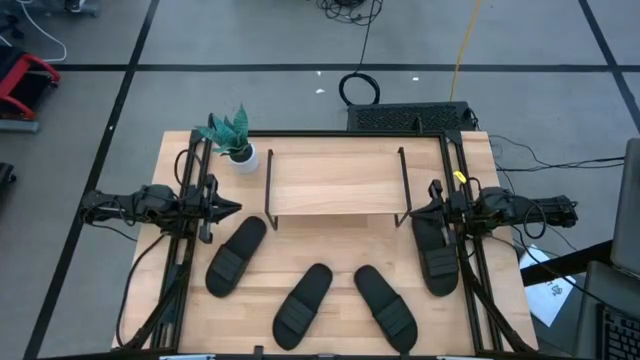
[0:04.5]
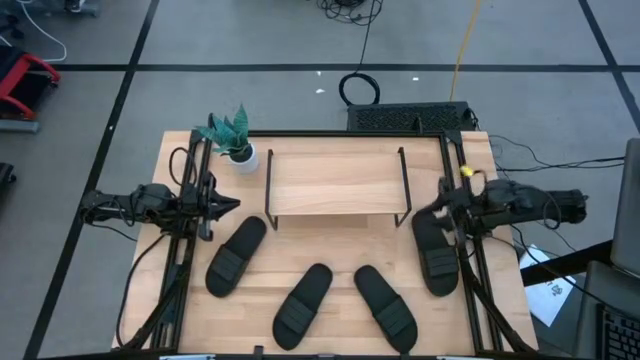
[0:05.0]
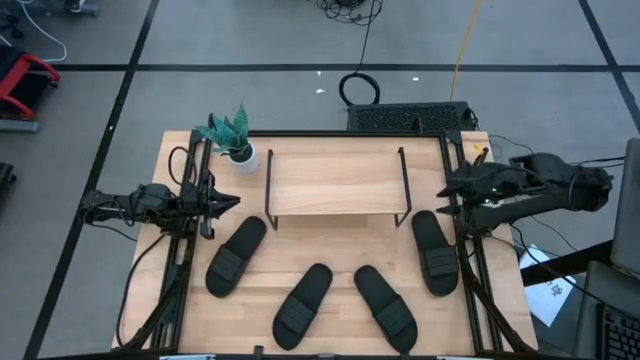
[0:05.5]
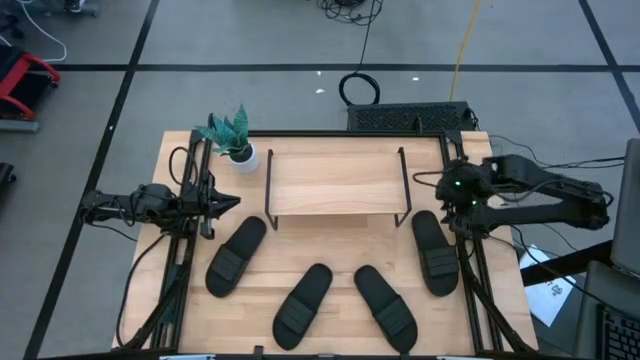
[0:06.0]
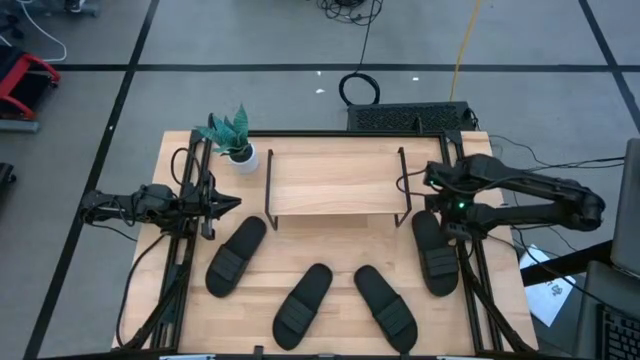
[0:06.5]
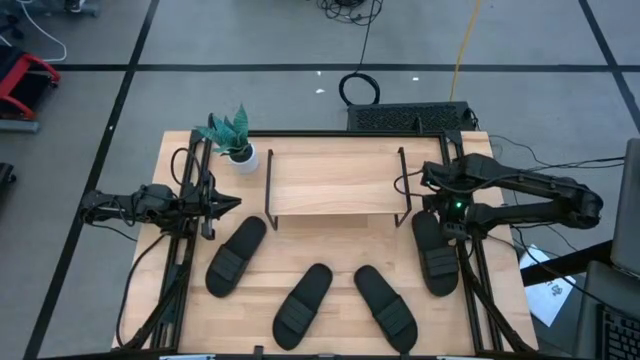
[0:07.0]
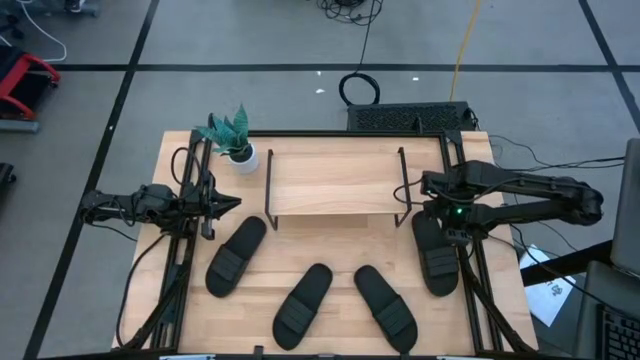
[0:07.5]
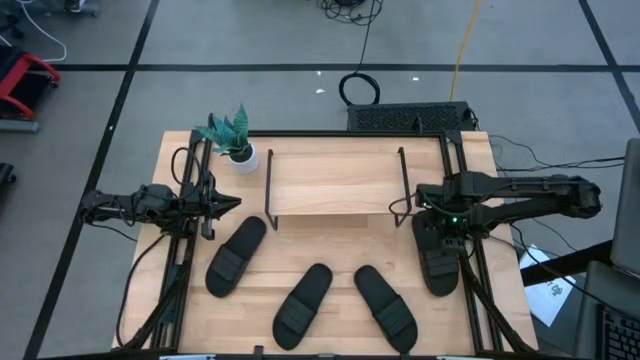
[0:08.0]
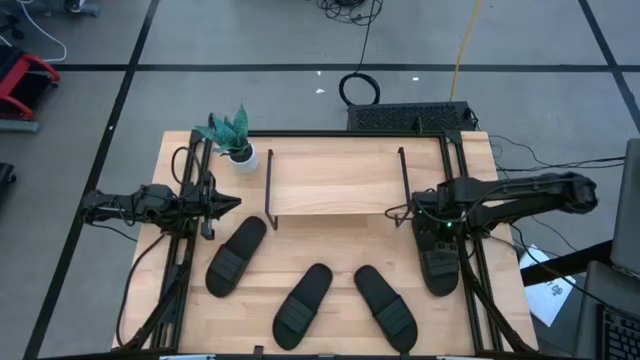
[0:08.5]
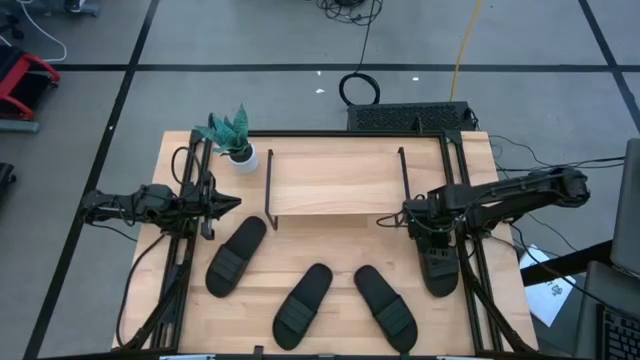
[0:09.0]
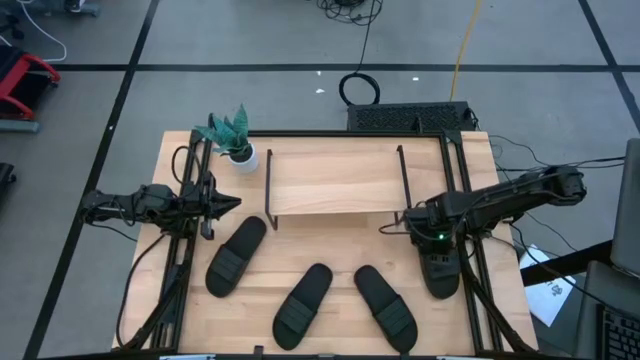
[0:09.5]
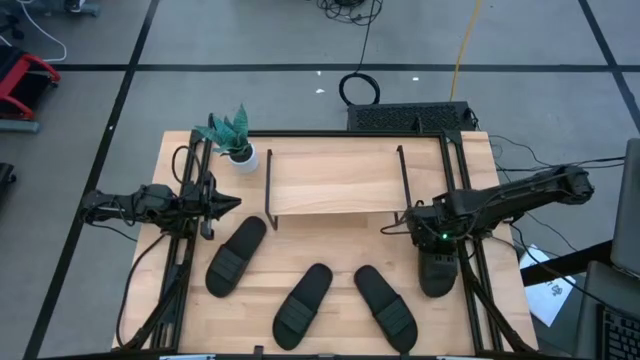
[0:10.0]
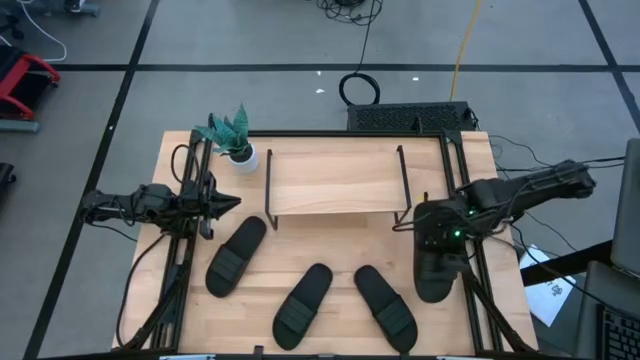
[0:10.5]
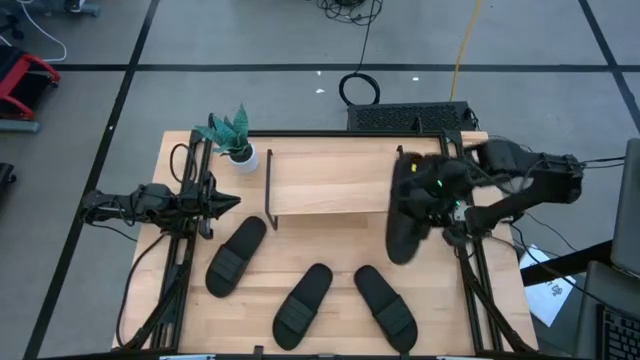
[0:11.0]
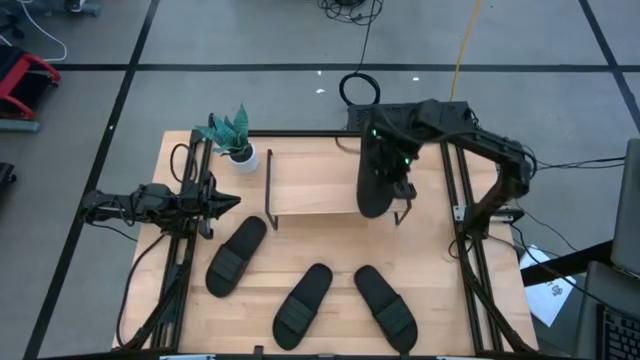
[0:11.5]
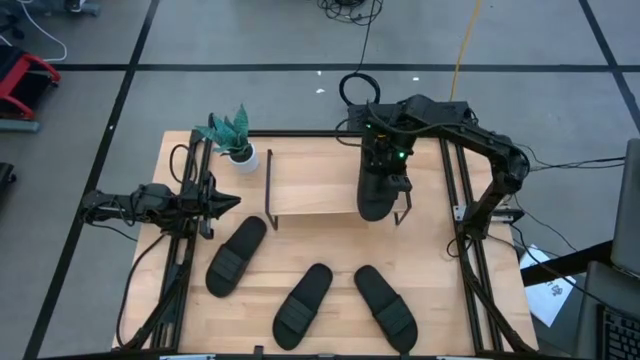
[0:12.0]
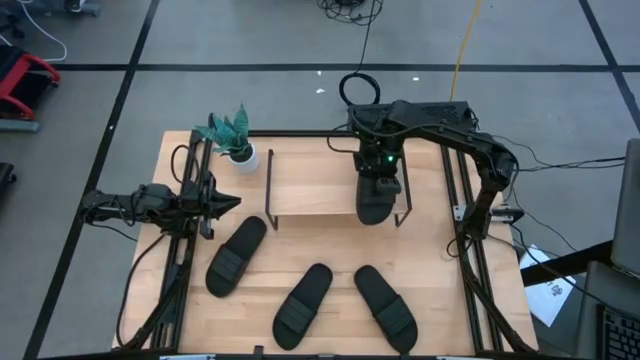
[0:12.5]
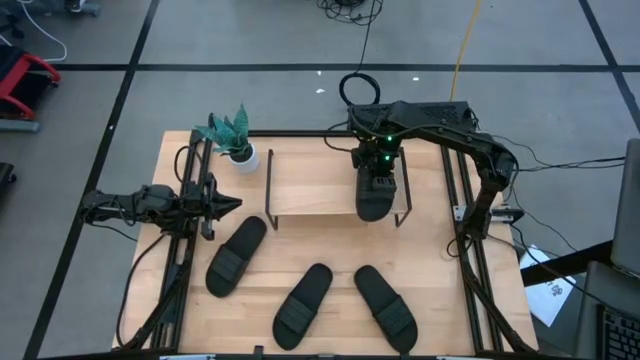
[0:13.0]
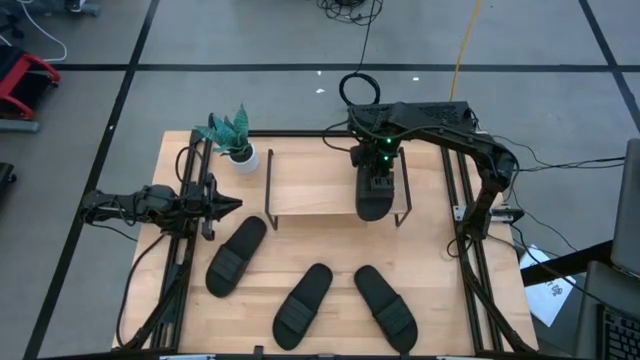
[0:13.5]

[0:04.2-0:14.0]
Task: Pick and place slides into the shelf
Put the black slipper on the shelf

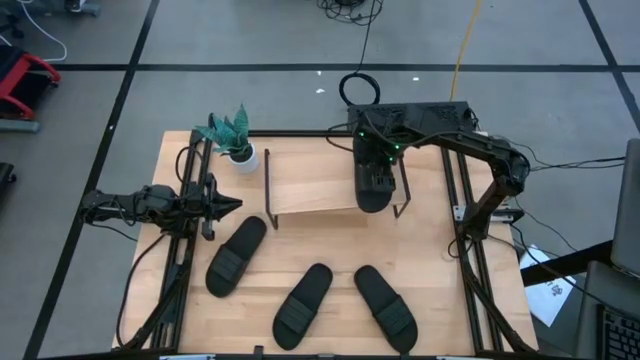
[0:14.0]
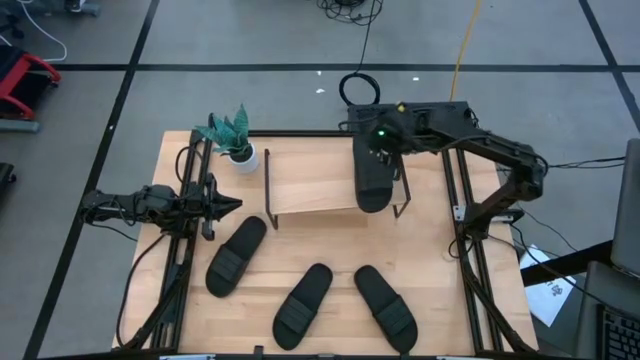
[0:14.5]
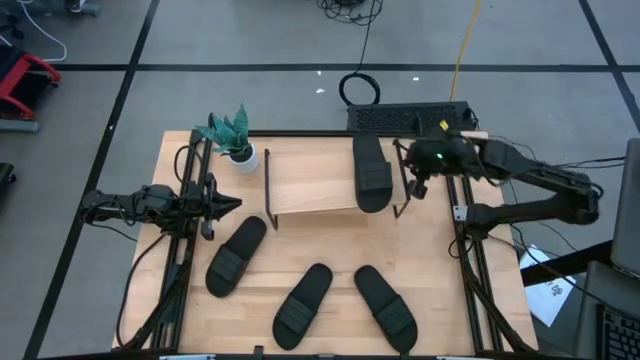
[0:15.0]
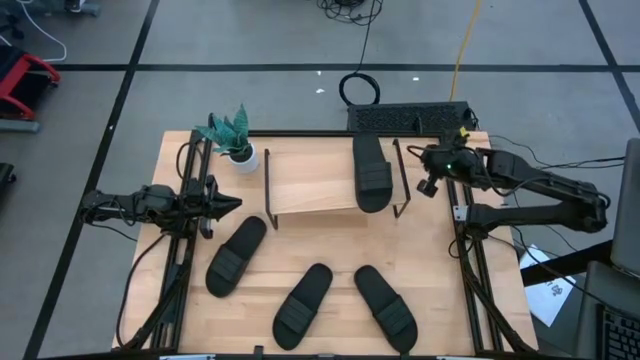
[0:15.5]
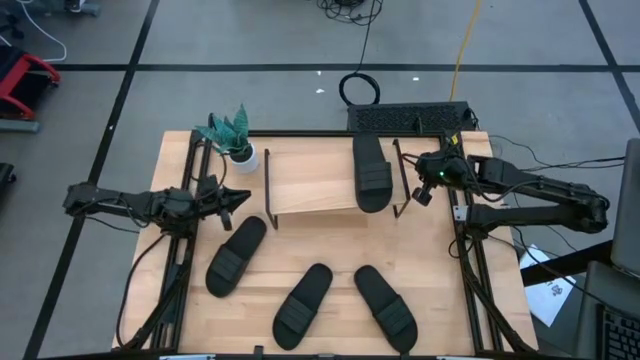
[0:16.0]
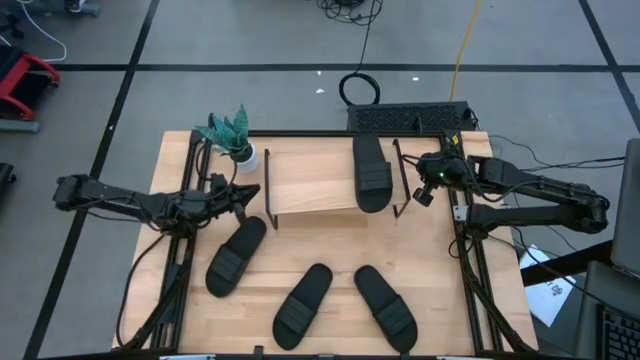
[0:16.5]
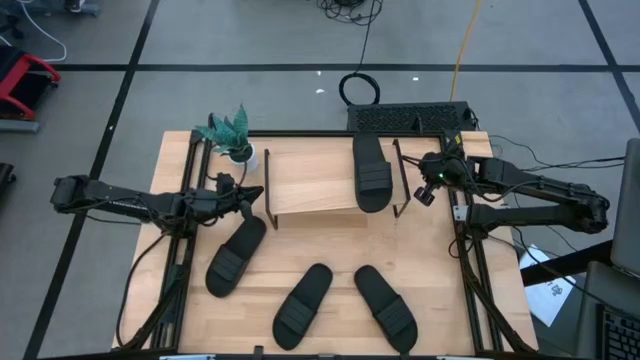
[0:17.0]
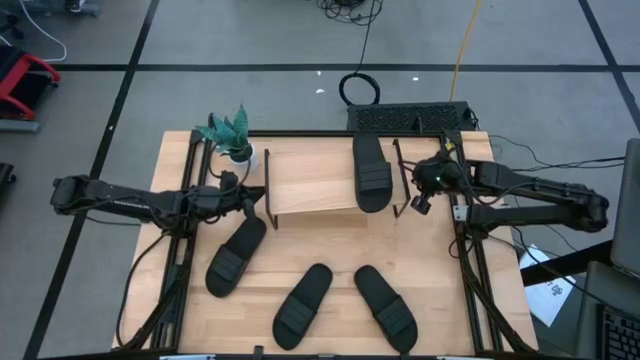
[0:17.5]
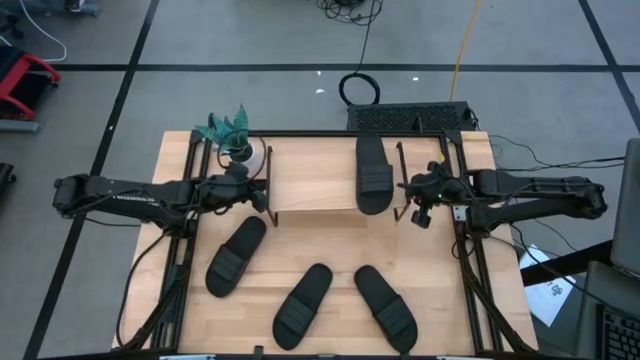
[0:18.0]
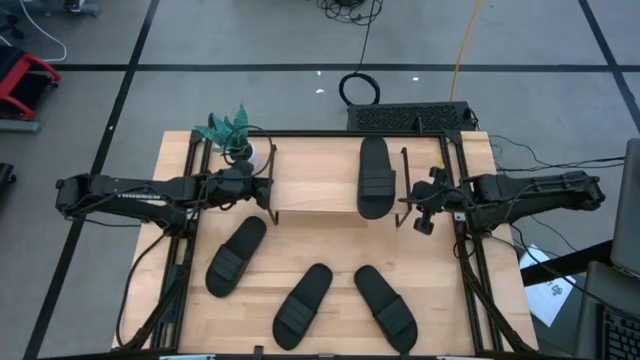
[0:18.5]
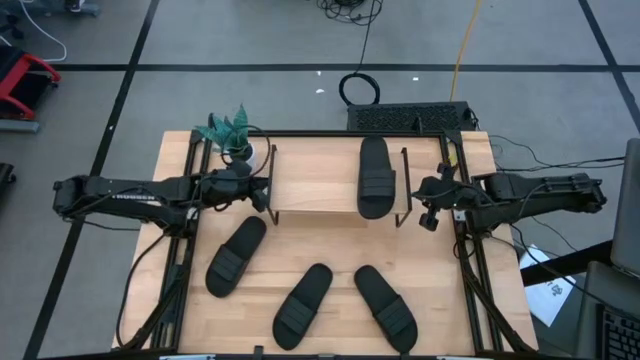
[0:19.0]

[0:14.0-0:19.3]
Adjust the shelf

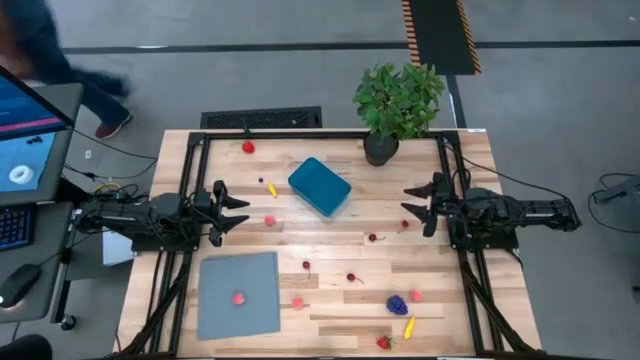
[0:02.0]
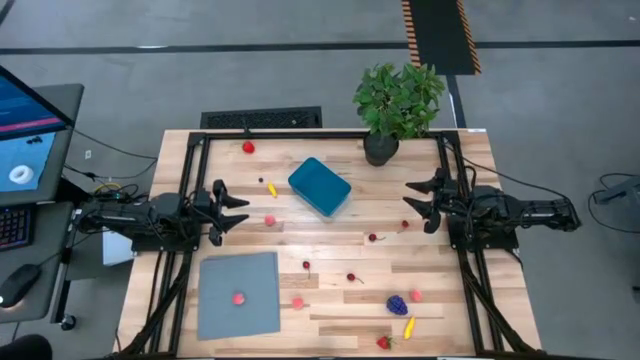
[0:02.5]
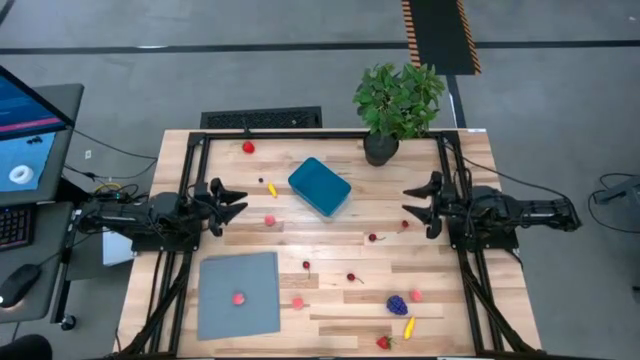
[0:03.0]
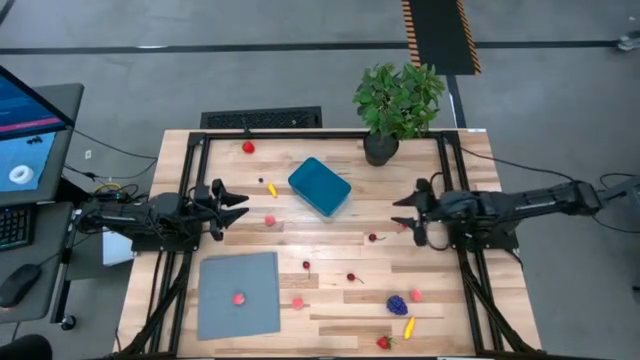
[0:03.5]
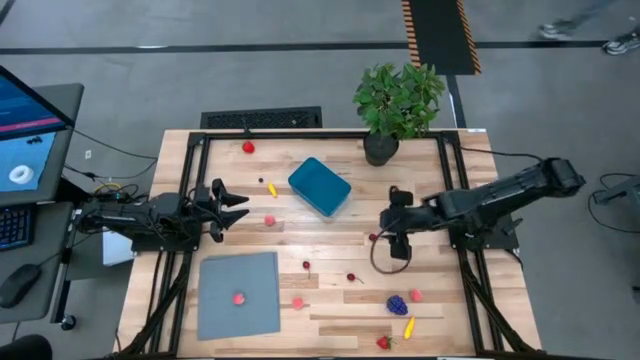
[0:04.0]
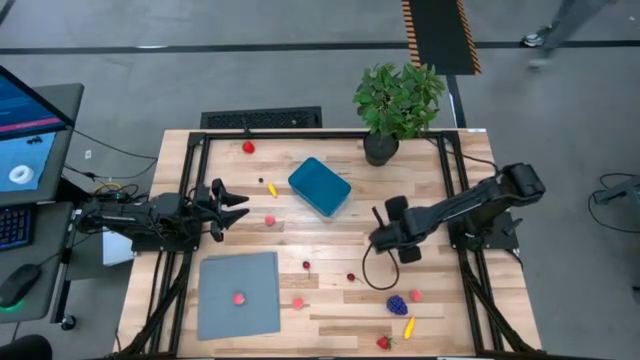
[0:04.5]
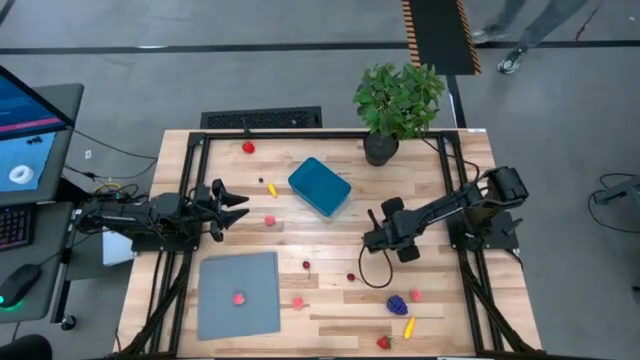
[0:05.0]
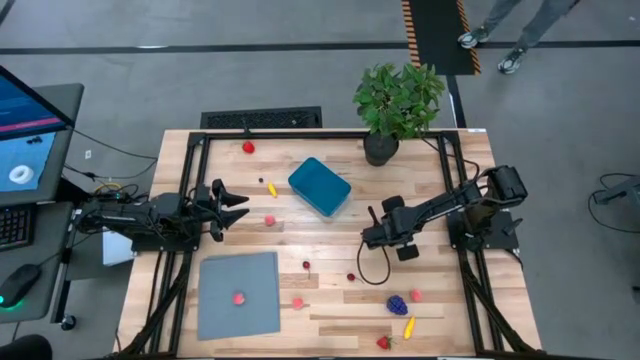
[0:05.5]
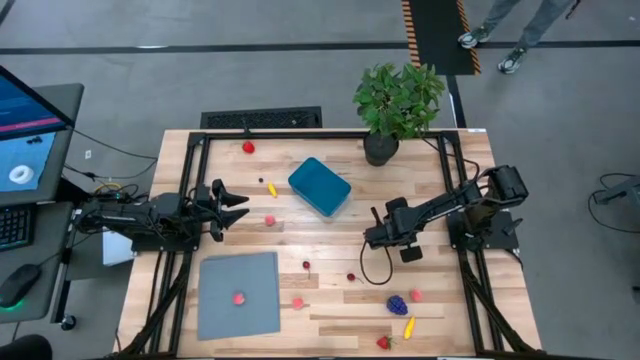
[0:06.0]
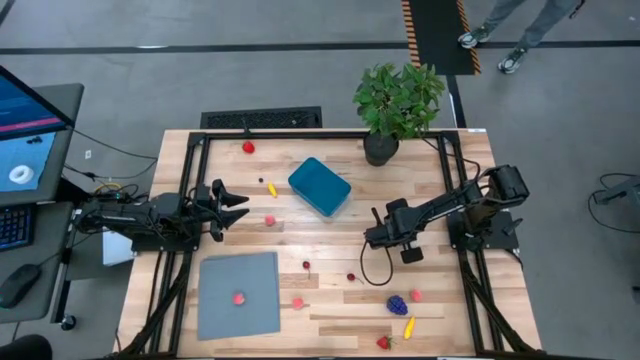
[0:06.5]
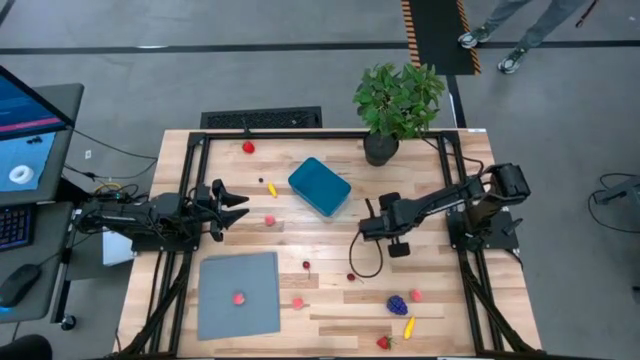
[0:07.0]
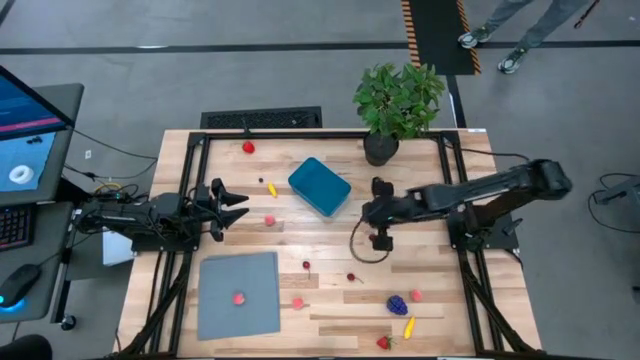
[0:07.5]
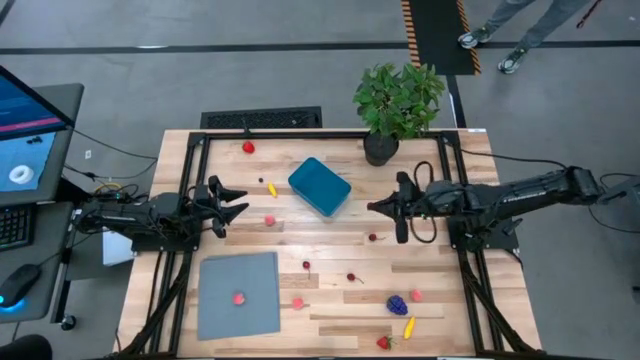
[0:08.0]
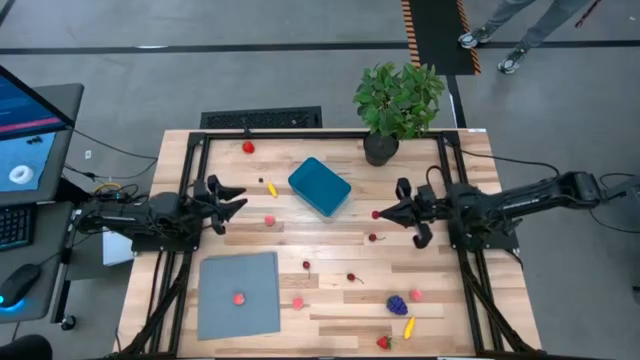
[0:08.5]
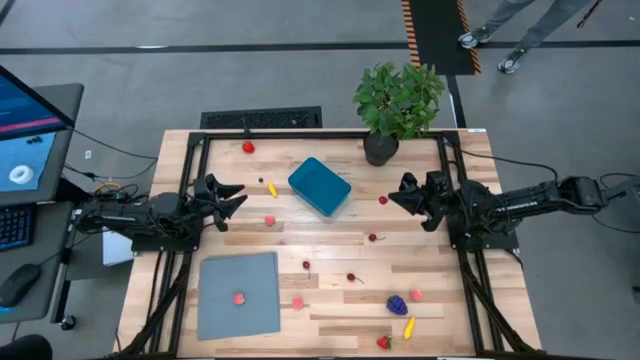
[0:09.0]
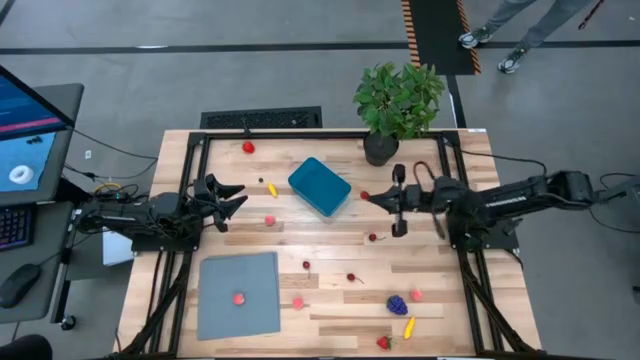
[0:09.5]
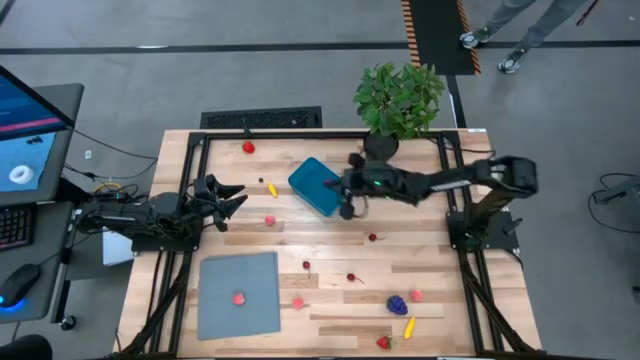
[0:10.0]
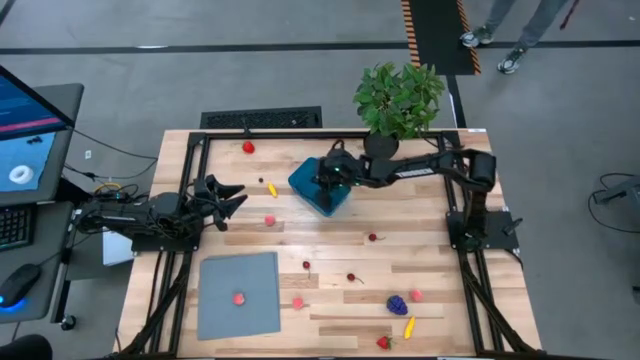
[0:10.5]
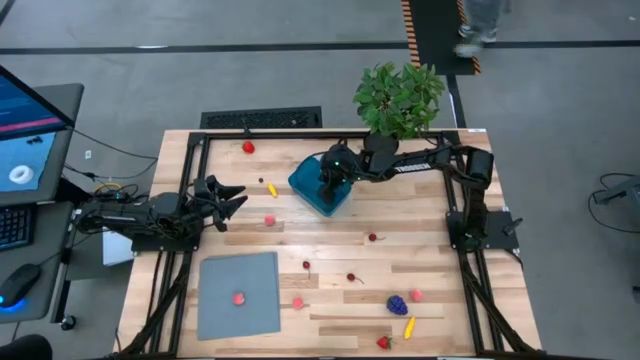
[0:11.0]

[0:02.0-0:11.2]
Task: Pick and placing Produce into tupperware
Put the cherry into the container
